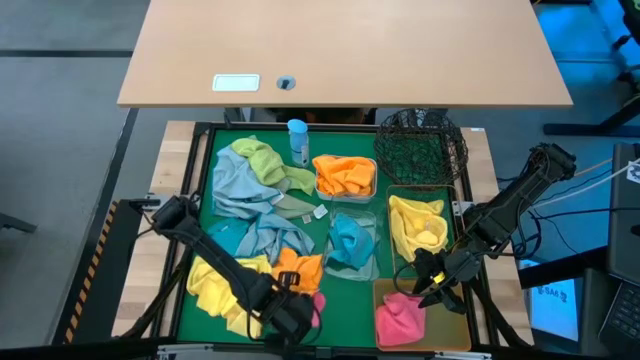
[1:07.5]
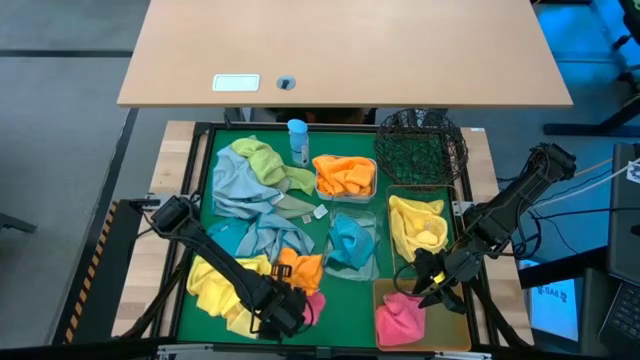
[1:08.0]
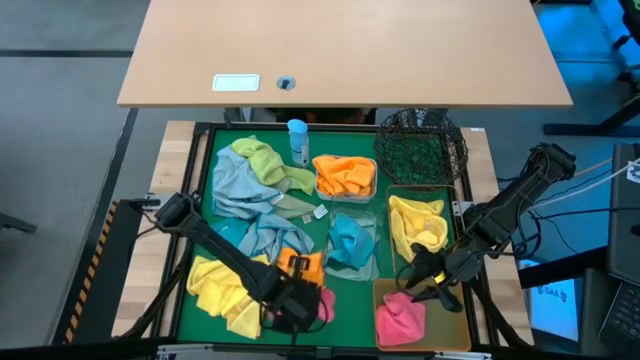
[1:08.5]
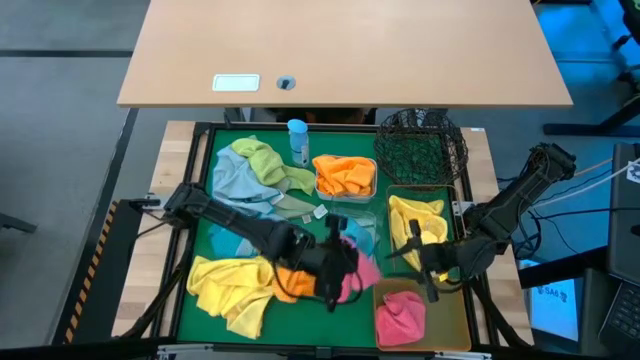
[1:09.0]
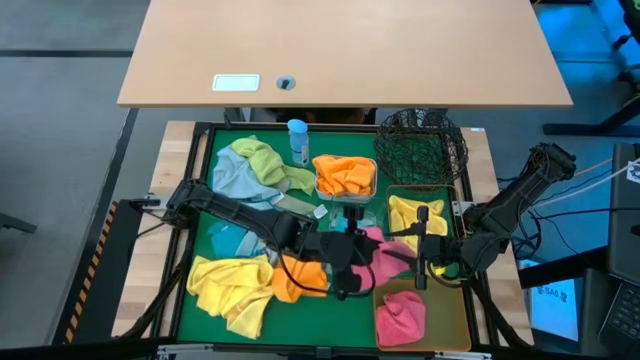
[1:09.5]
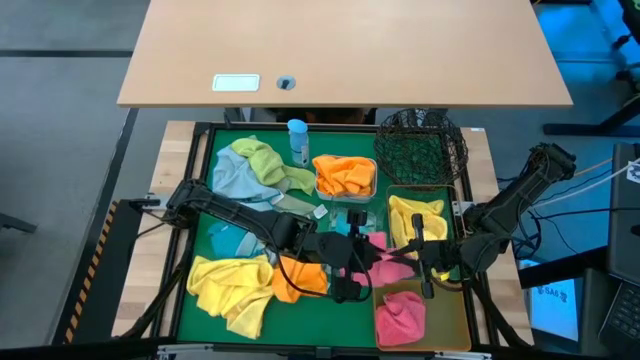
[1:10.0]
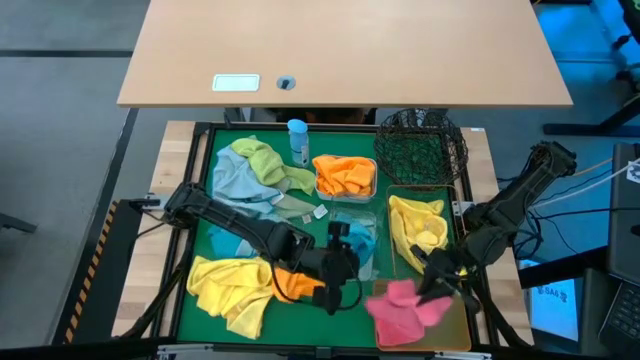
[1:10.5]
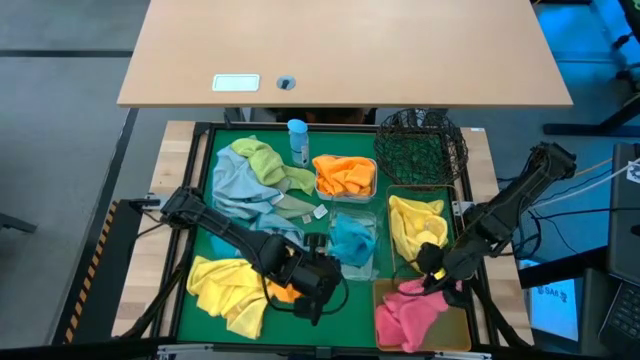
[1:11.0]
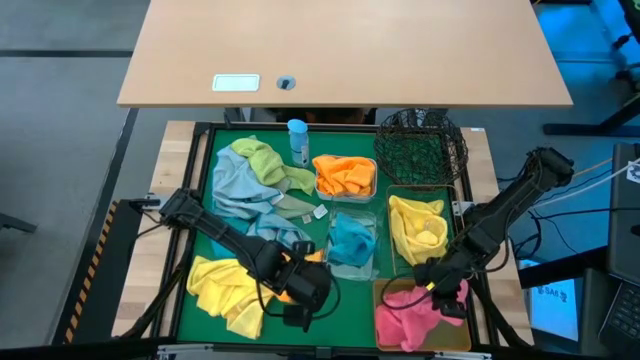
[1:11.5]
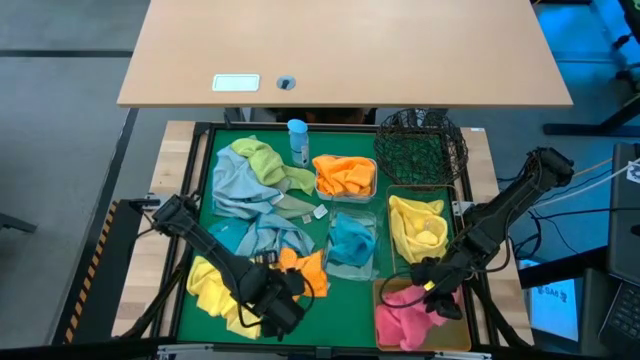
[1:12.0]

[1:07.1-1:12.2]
Task: Sort microfiber towel by color & place in baskets
Put the pink towel into the orange bin

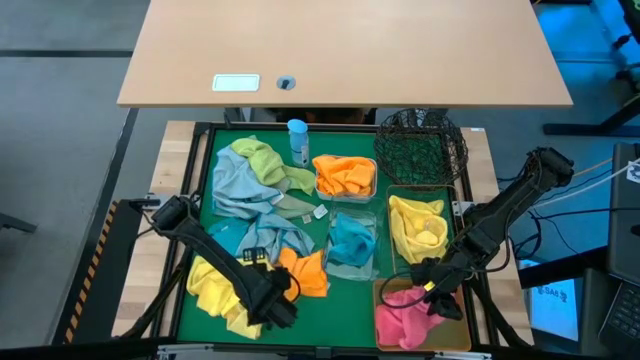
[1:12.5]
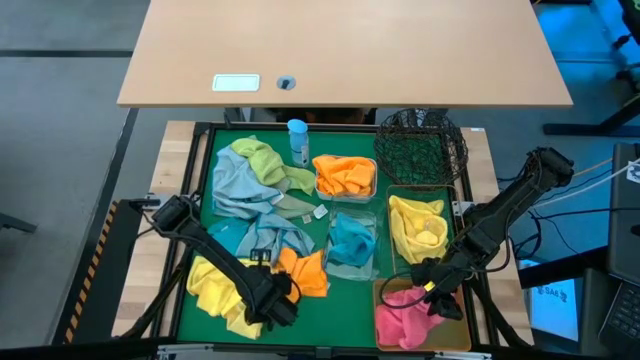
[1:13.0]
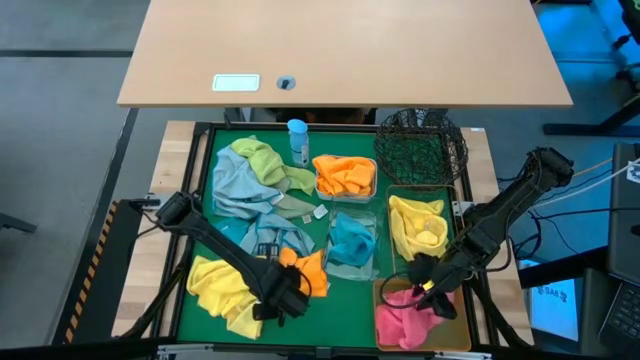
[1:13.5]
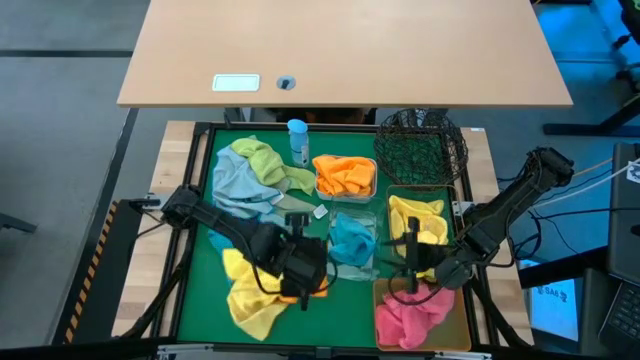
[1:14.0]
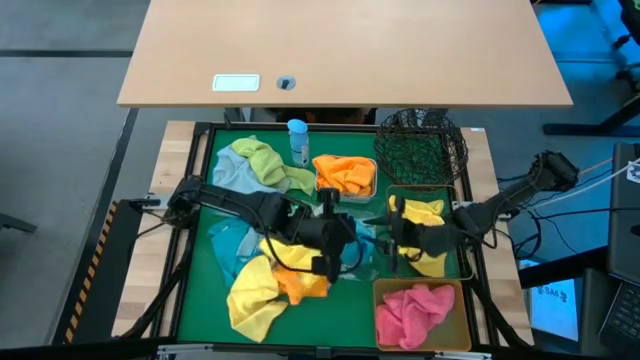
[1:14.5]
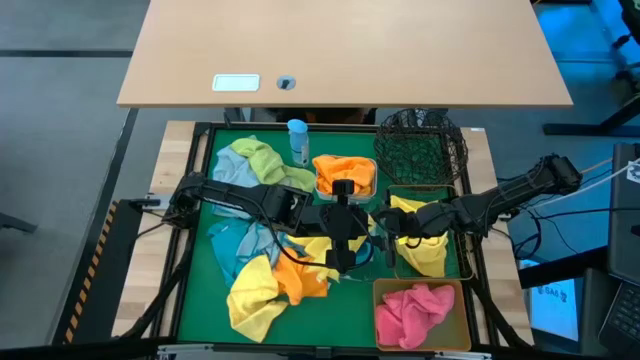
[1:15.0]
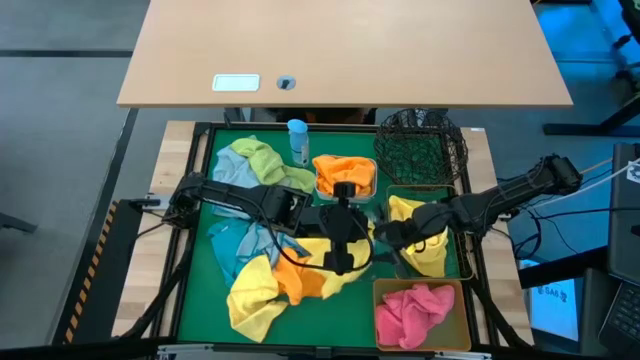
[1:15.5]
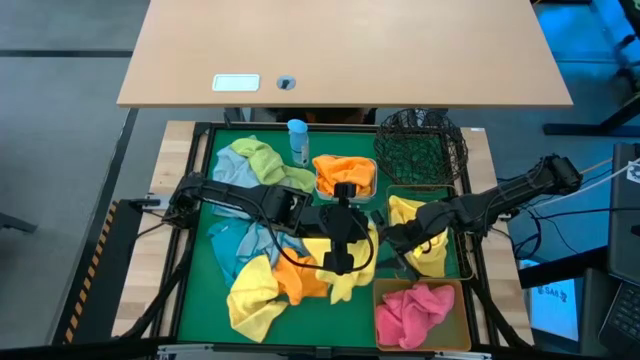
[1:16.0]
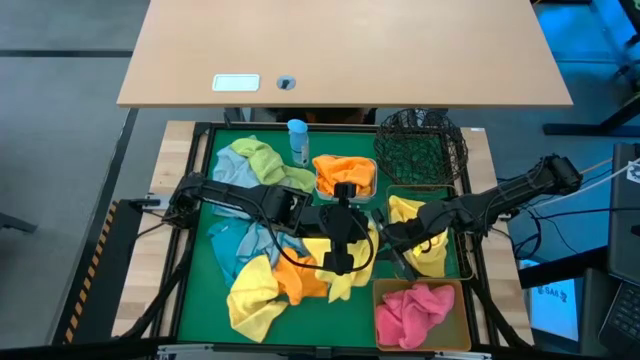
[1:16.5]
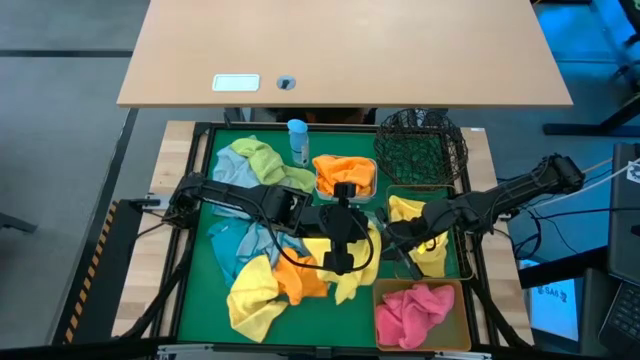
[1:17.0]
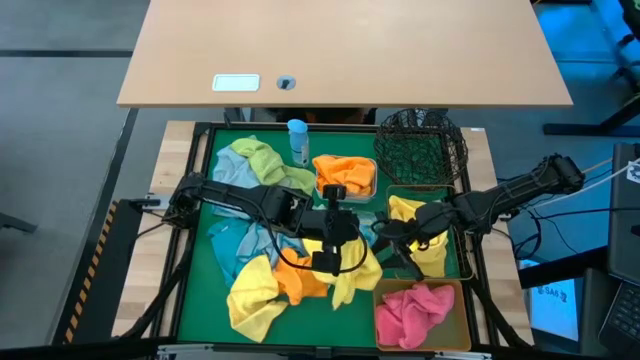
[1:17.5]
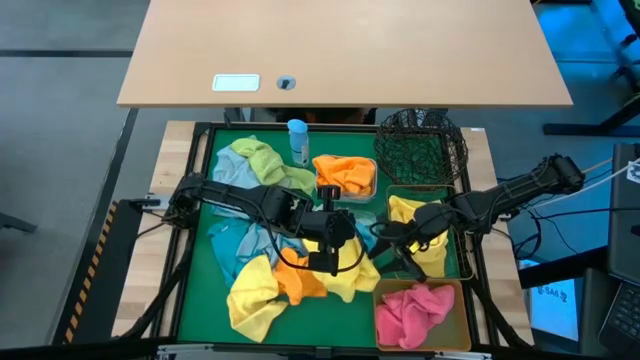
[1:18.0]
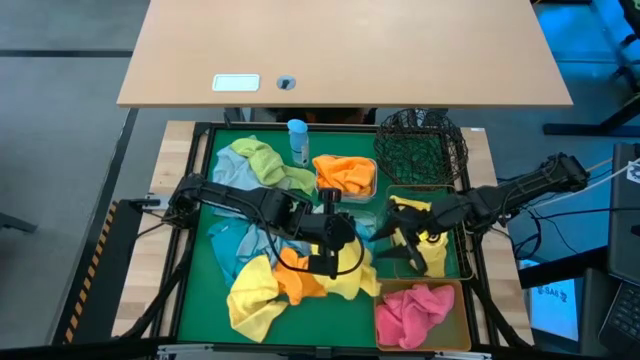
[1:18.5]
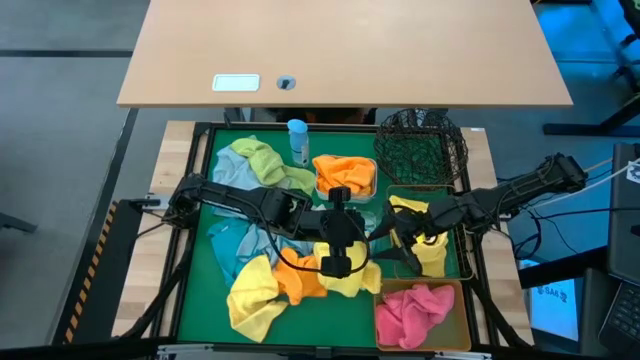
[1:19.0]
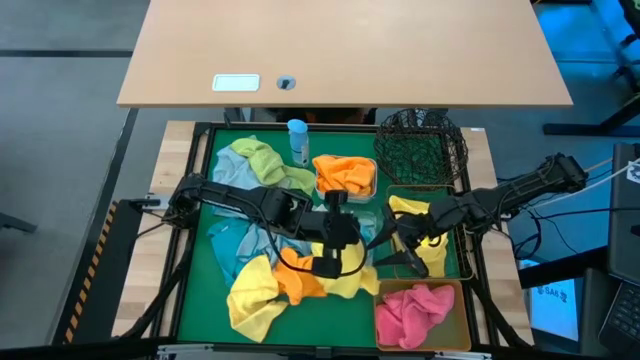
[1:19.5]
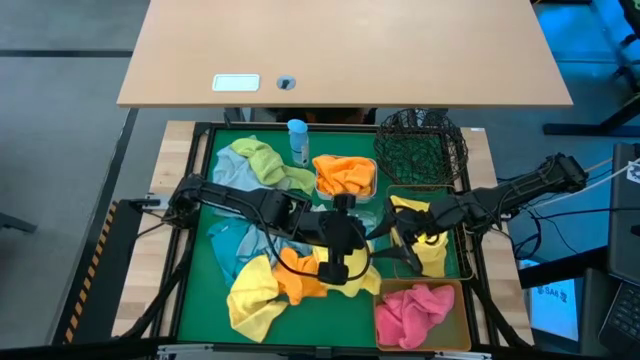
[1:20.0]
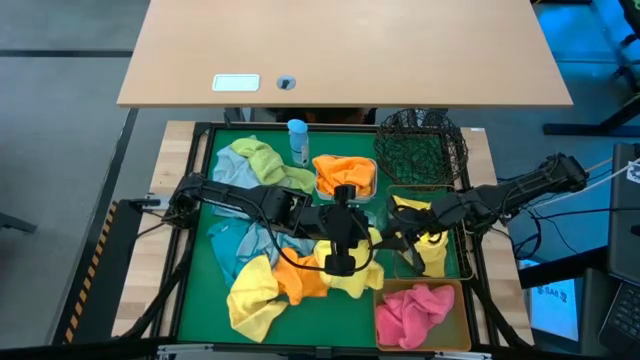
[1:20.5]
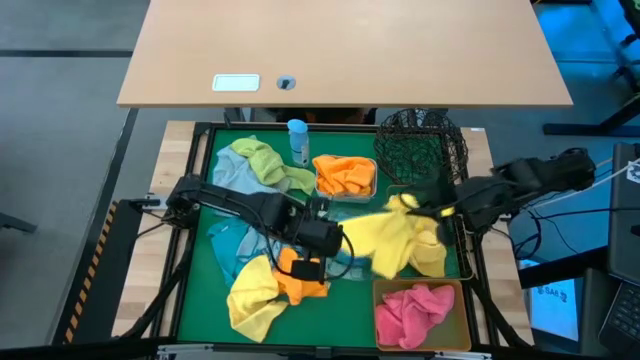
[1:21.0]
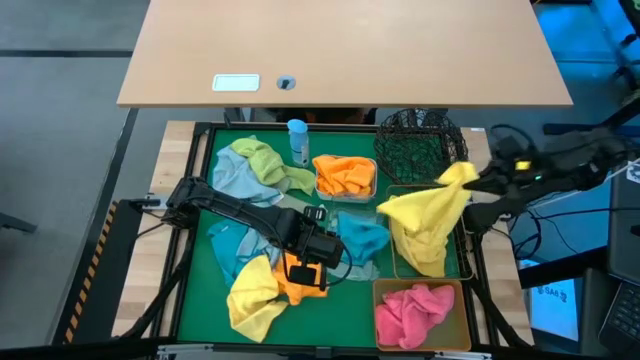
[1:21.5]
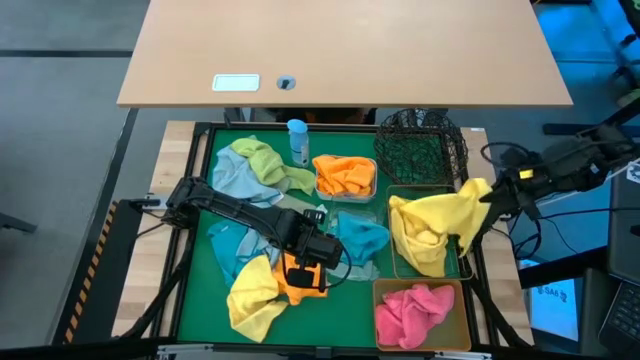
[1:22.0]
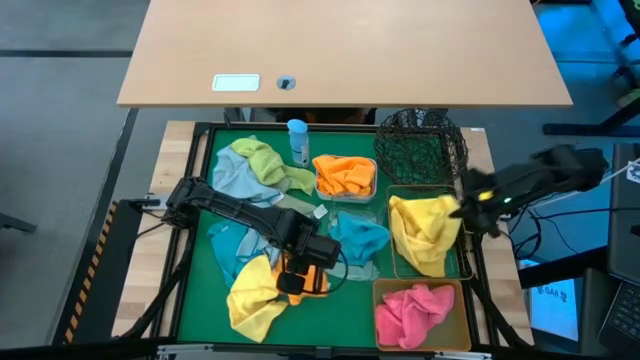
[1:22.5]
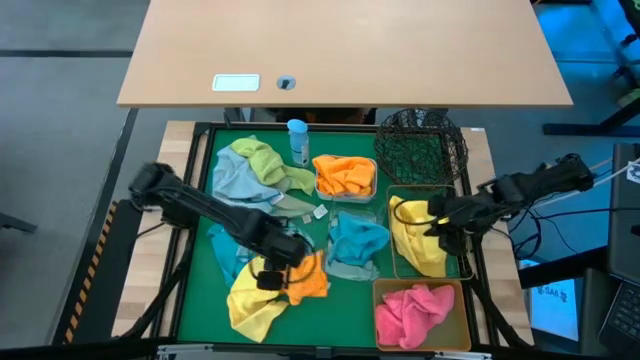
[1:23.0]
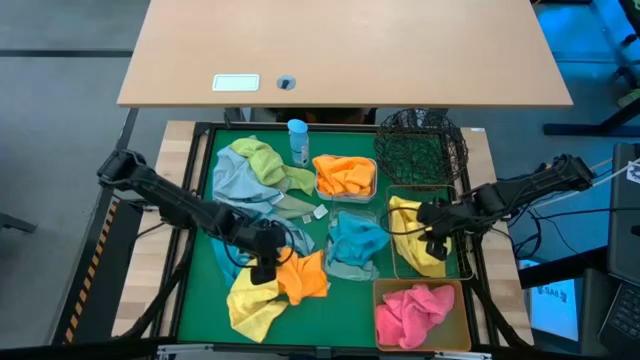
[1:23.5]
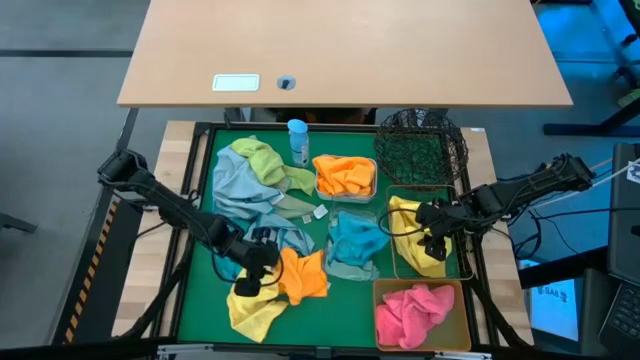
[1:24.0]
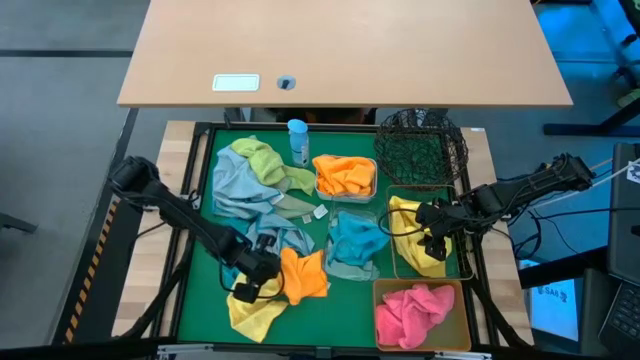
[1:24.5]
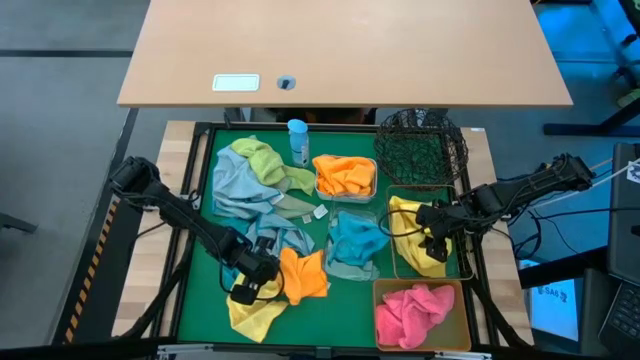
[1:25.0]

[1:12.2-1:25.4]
Put the yellow towel into the gold wire basket

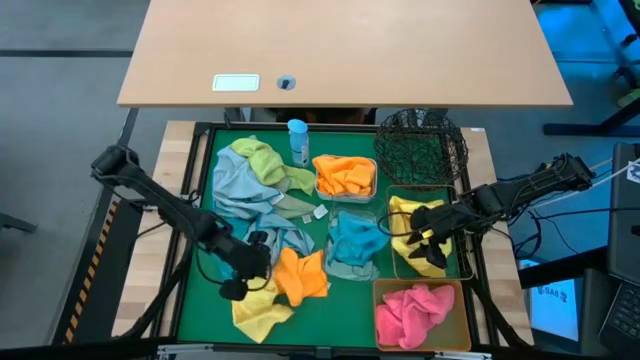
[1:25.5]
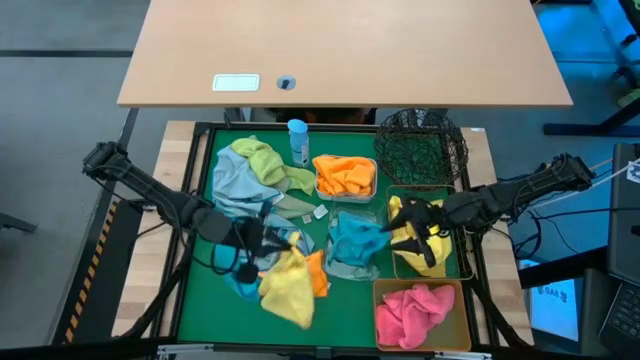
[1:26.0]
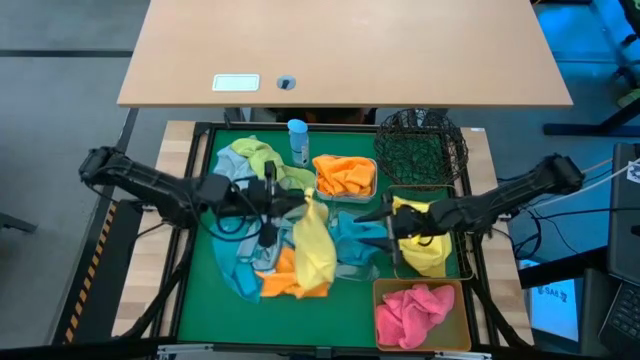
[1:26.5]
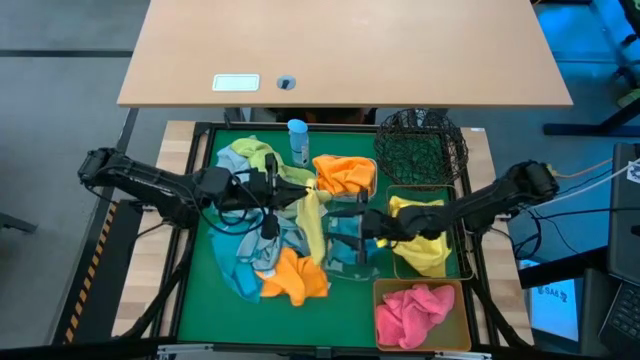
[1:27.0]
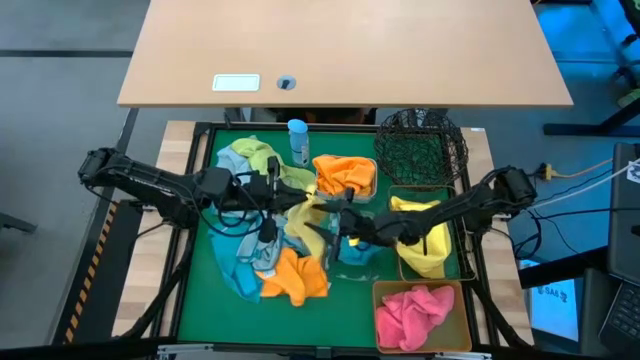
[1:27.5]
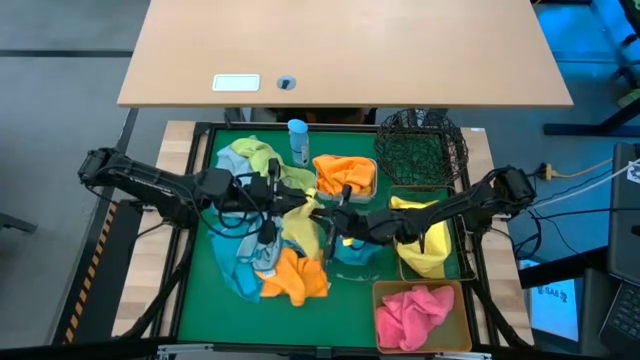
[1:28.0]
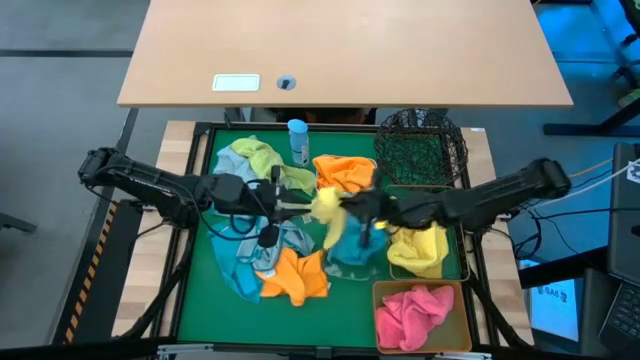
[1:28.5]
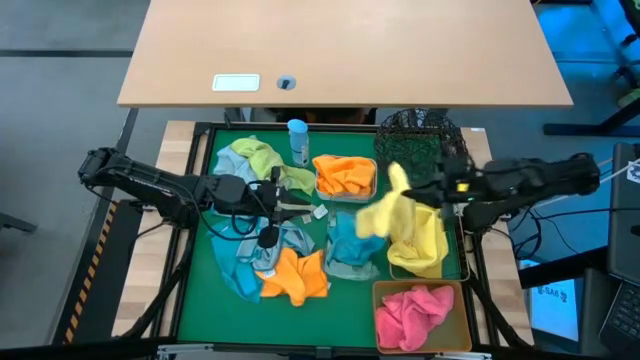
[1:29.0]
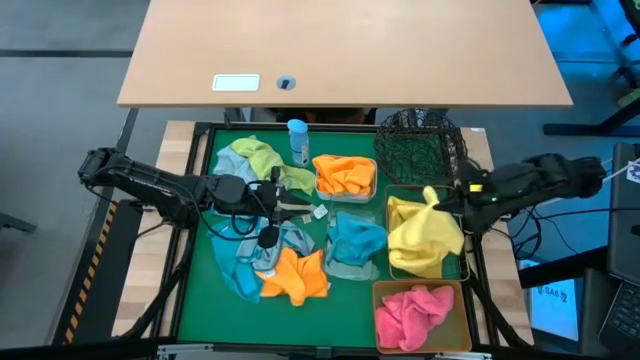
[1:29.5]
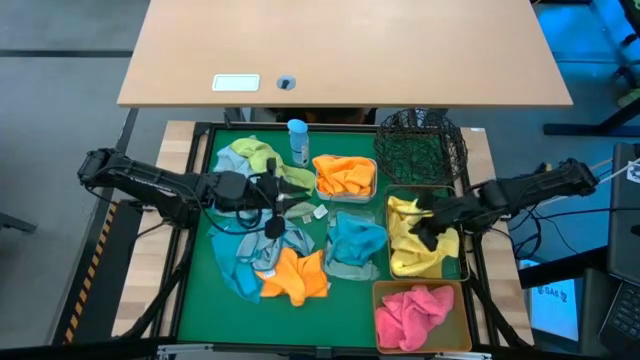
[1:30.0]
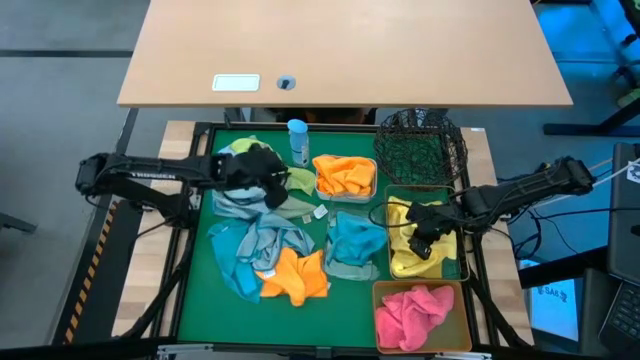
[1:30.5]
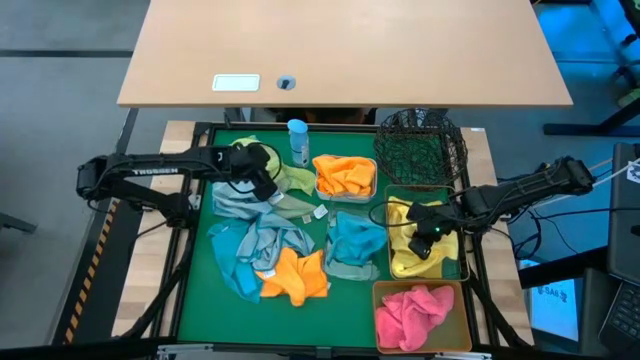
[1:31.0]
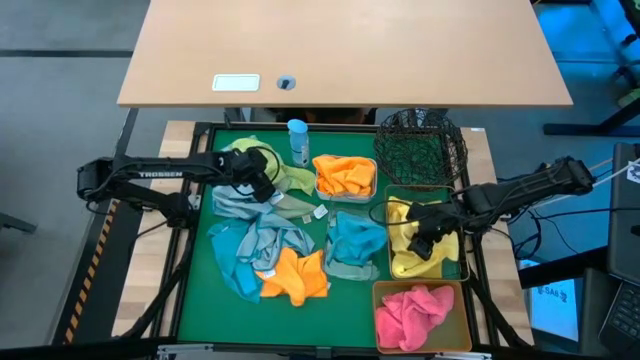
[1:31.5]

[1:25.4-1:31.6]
Put the yellow towel into the gold wire basket
